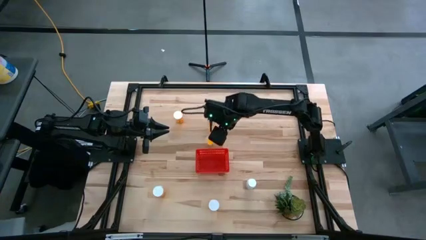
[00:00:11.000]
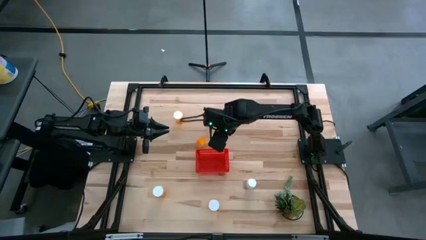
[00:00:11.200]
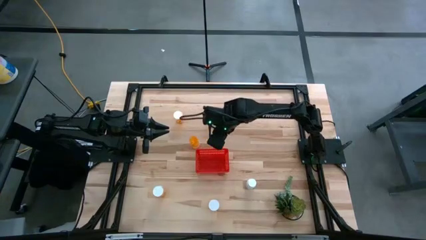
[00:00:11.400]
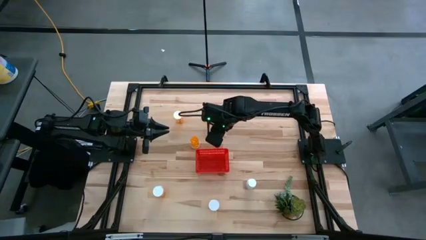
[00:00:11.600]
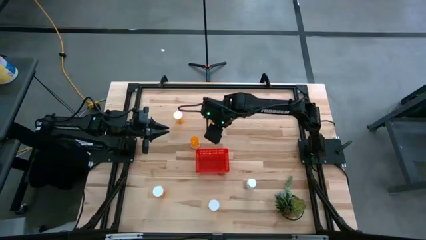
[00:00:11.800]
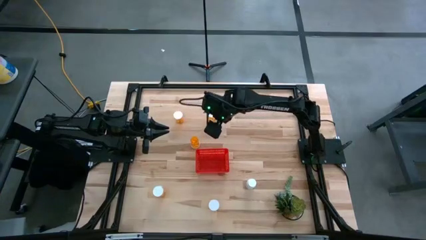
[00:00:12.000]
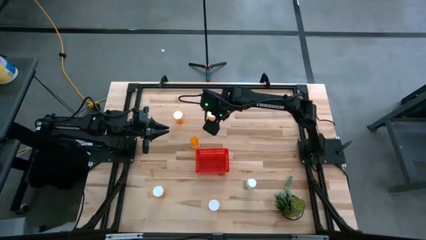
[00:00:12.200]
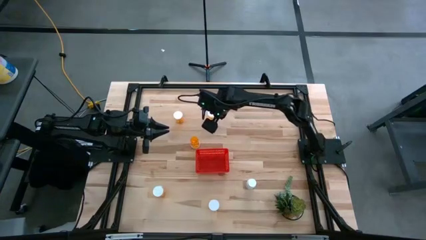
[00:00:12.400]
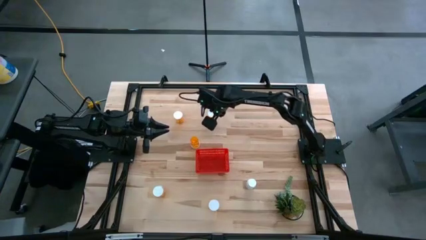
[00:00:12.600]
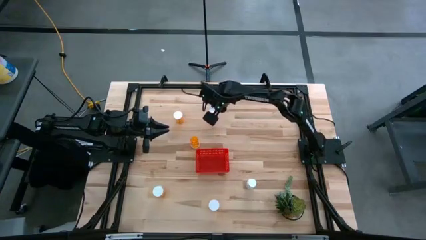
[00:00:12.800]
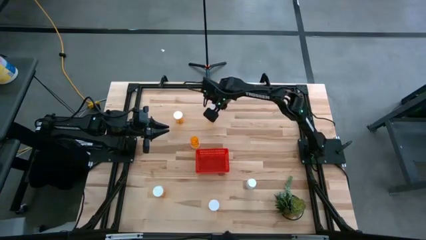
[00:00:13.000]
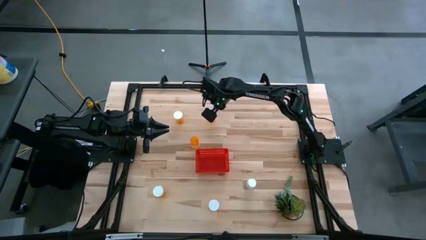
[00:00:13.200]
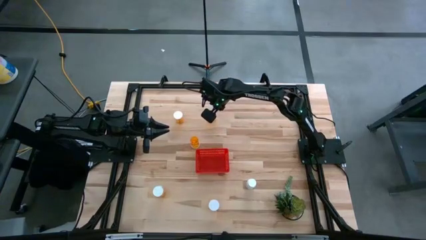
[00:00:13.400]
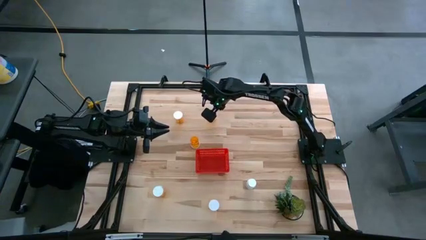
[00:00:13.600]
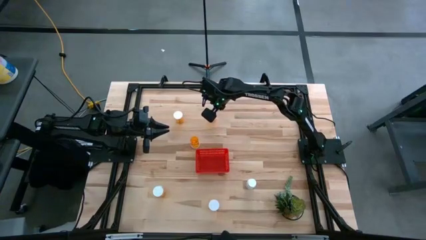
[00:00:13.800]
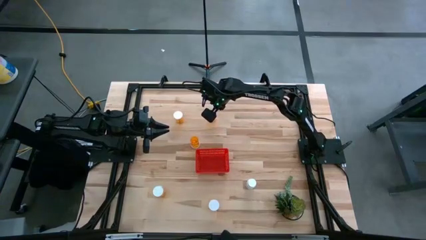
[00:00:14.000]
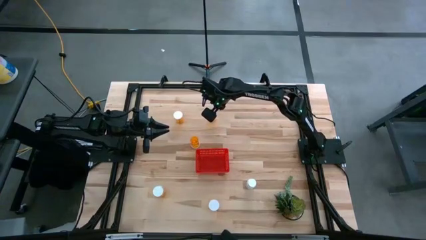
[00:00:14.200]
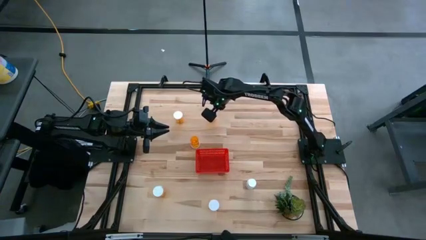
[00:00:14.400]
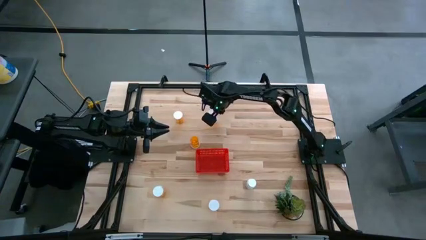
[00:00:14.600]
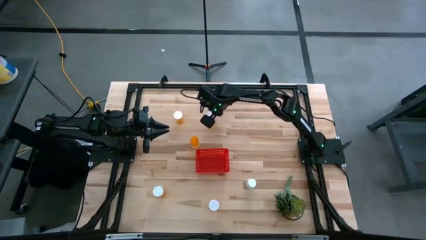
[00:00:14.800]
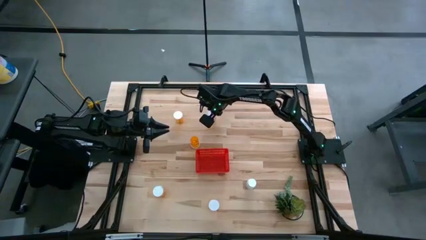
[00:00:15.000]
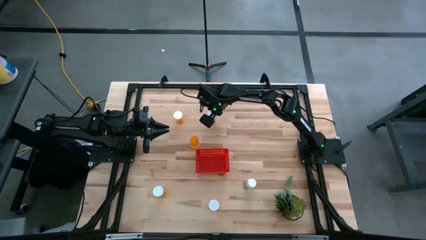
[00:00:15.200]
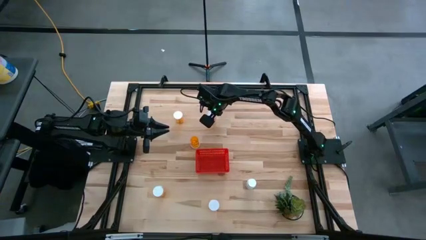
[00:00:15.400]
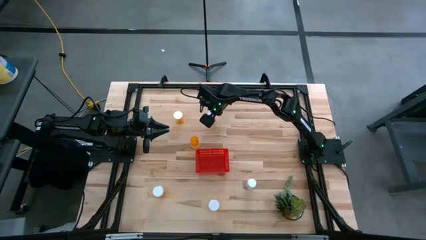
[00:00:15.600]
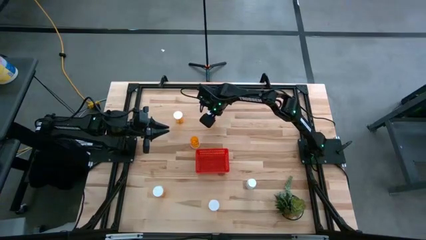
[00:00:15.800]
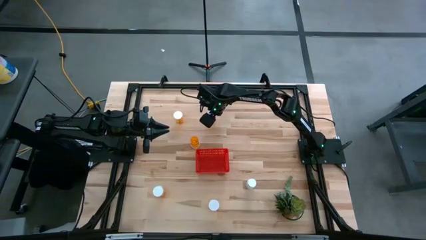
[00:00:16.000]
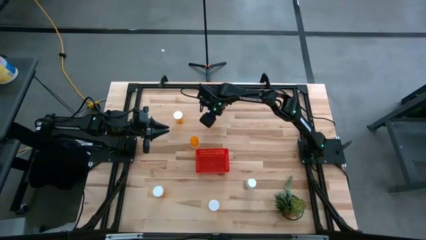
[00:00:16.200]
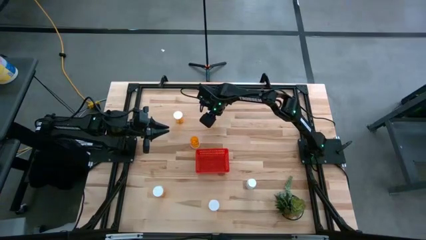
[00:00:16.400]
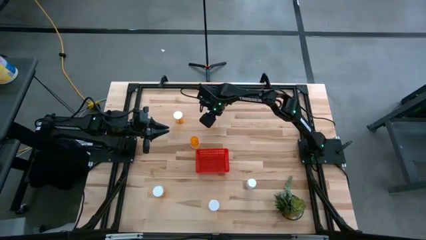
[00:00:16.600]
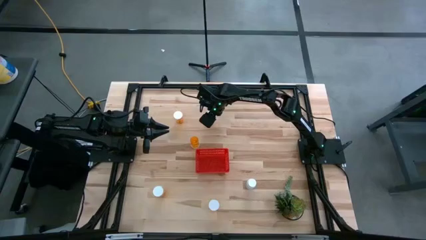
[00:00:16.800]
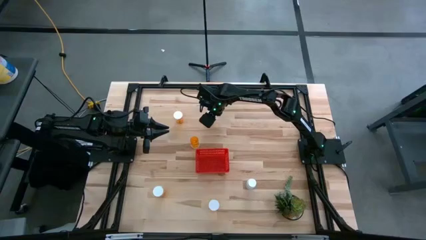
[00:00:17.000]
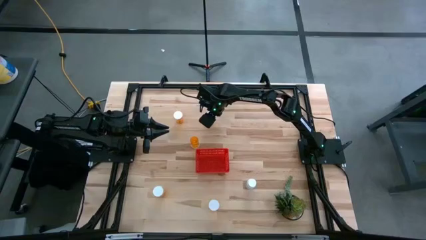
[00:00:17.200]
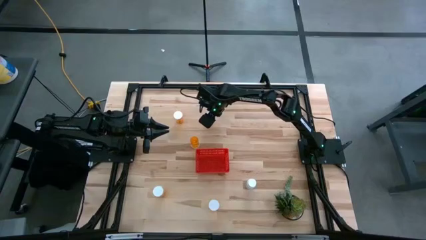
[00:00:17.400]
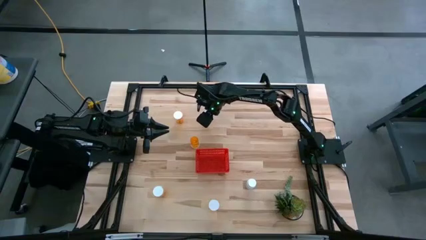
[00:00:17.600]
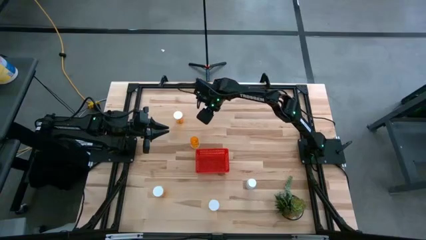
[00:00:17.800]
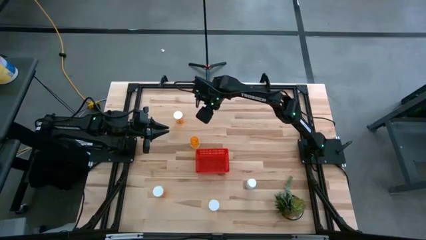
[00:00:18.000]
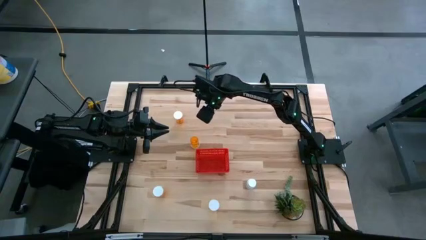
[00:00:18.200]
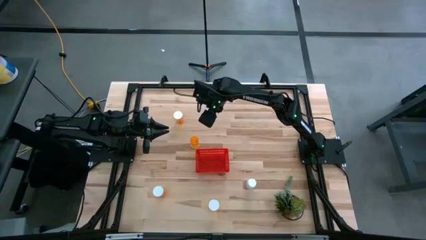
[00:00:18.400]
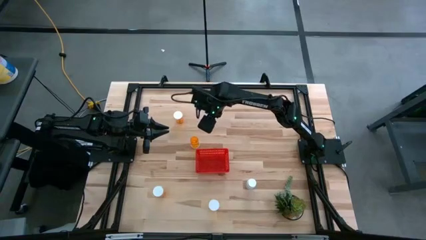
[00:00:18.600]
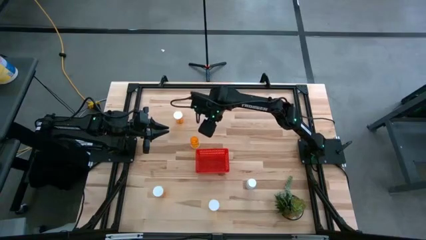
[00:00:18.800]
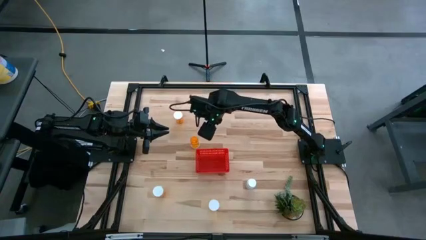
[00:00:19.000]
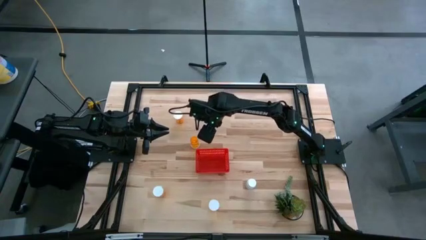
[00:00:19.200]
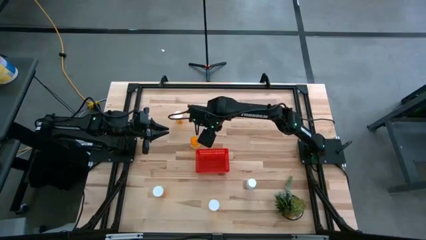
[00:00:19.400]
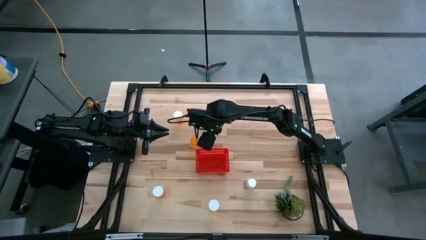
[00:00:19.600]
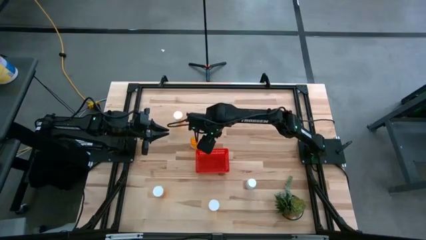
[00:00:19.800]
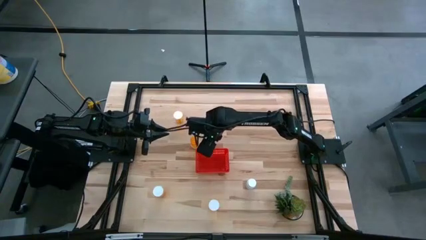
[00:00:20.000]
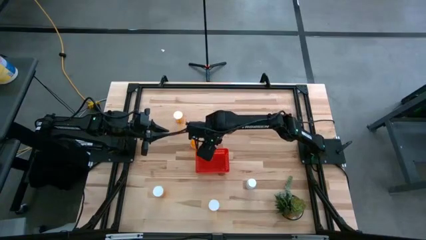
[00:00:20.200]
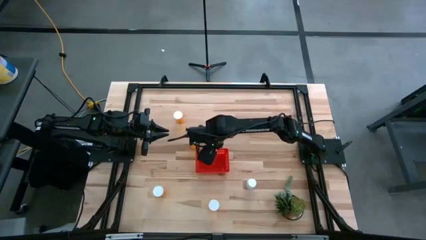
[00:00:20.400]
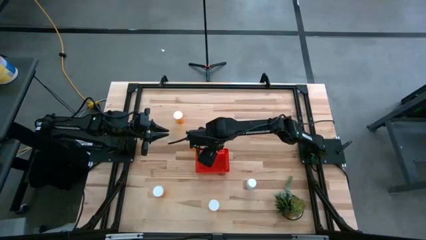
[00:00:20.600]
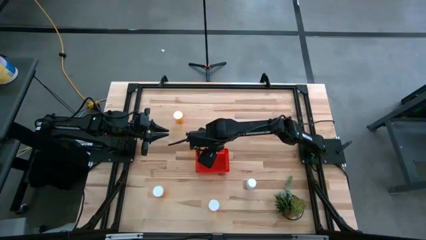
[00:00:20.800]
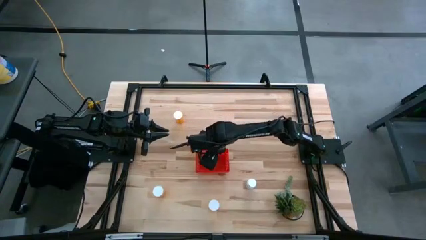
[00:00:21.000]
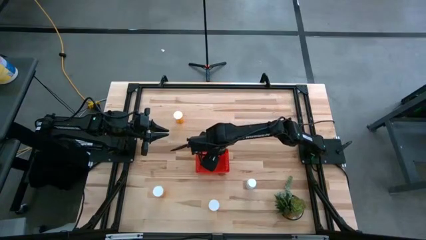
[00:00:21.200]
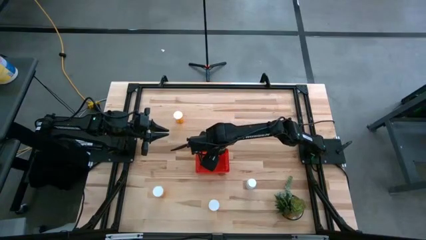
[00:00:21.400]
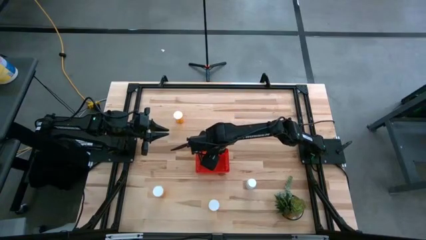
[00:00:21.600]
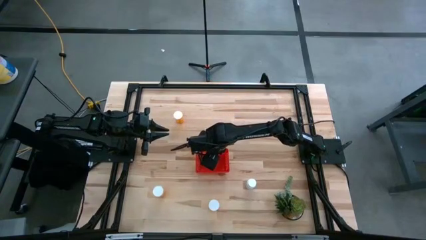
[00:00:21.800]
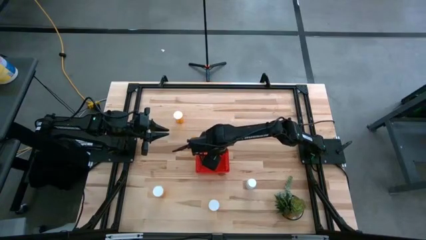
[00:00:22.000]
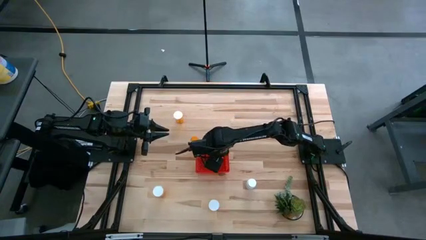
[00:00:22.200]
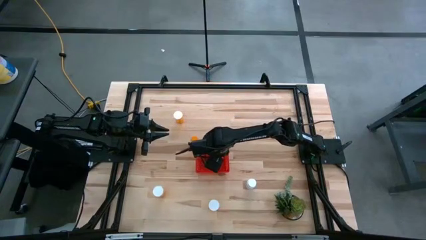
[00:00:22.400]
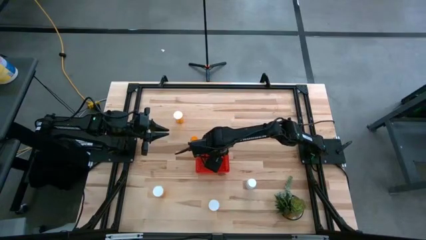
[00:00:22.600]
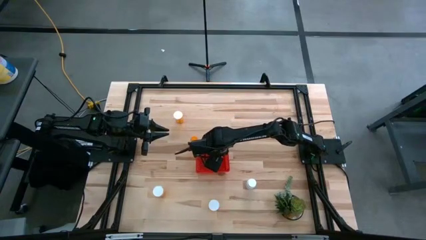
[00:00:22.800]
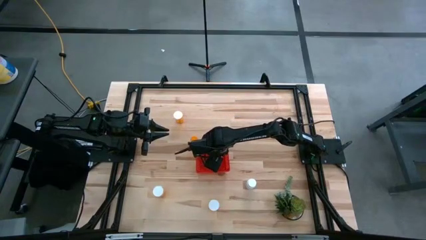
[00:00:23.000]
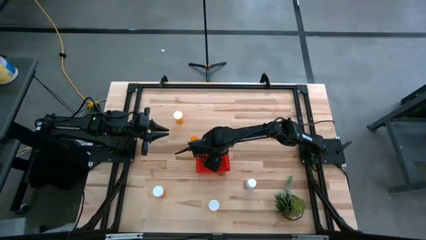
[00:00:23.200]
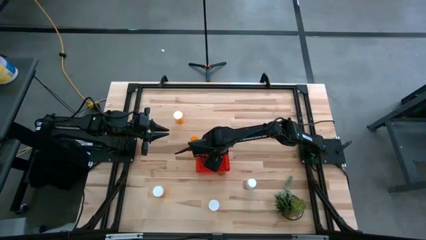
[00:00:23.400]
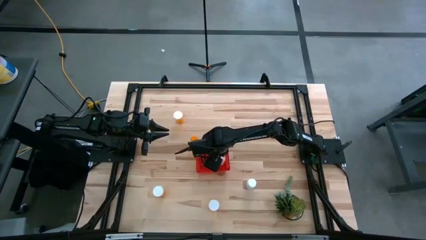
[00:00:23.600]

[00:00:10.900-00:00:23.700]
Task: Pick and place pill bottles into a basket
Put the orange pill bottle into the red basket

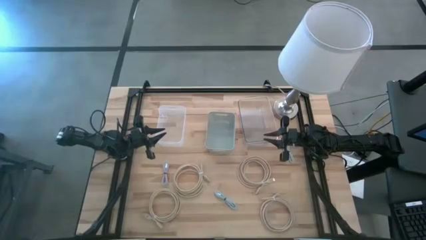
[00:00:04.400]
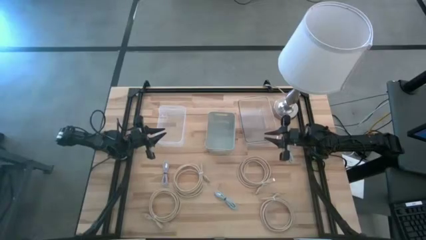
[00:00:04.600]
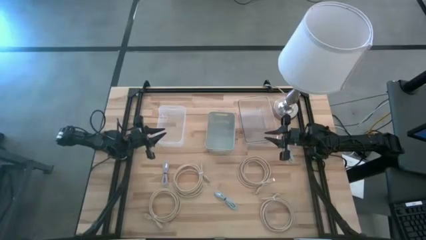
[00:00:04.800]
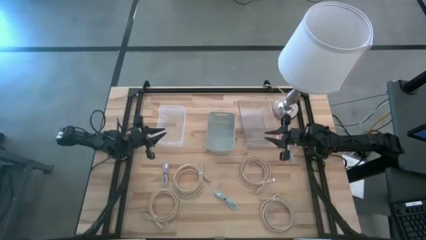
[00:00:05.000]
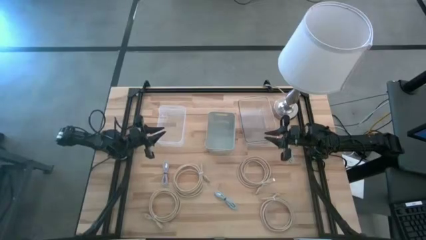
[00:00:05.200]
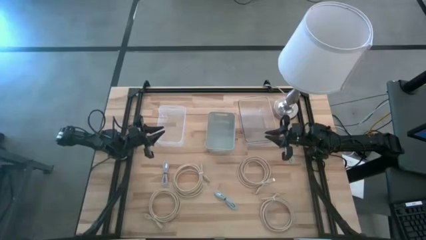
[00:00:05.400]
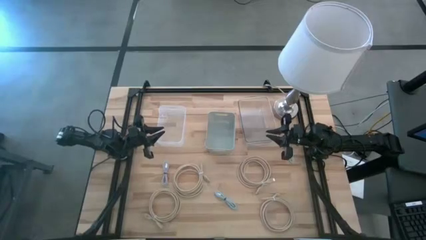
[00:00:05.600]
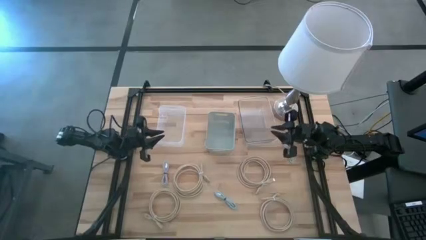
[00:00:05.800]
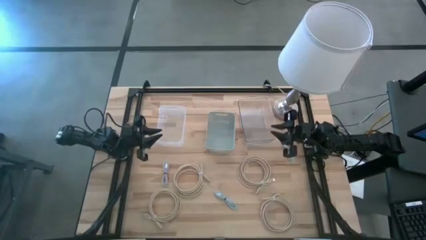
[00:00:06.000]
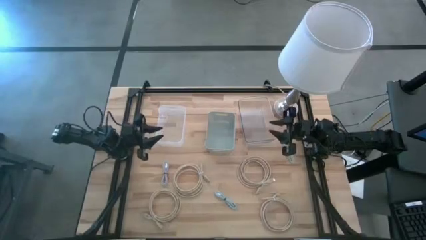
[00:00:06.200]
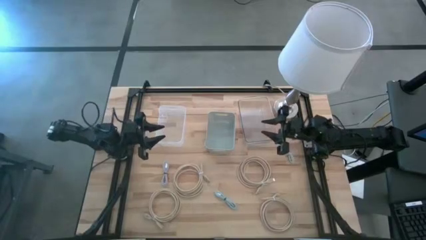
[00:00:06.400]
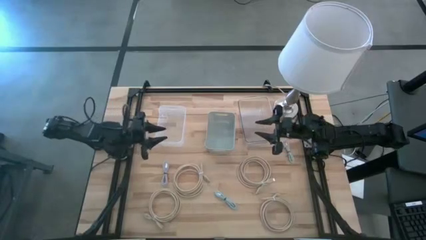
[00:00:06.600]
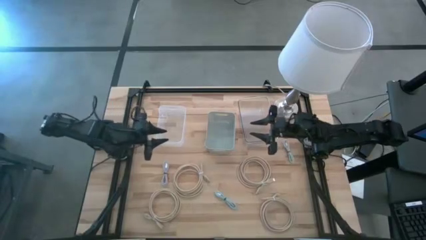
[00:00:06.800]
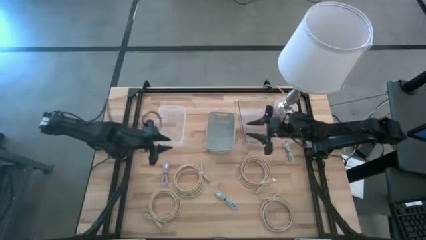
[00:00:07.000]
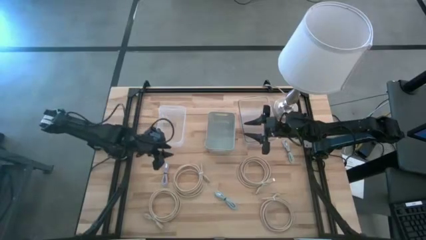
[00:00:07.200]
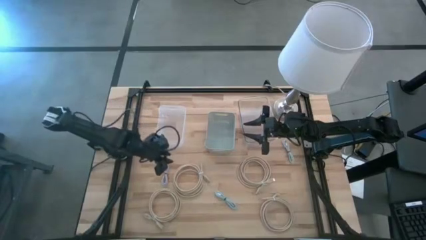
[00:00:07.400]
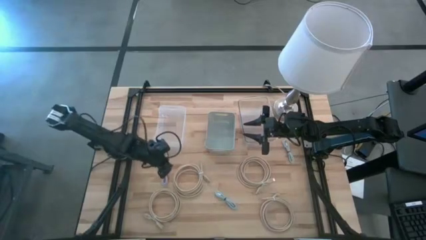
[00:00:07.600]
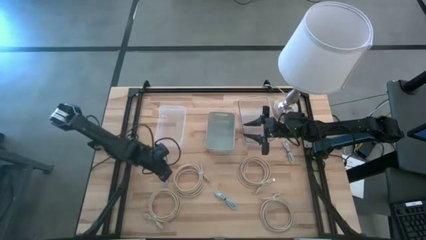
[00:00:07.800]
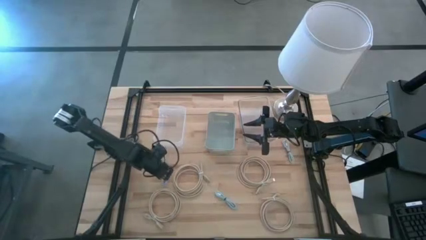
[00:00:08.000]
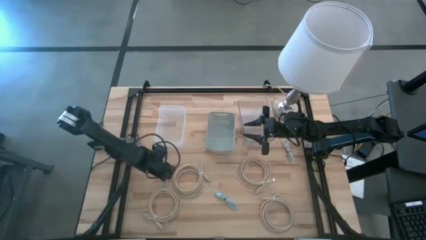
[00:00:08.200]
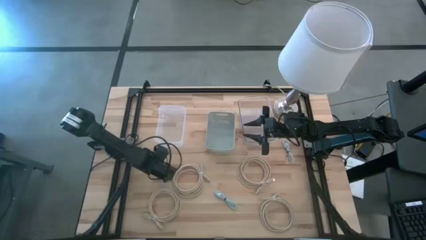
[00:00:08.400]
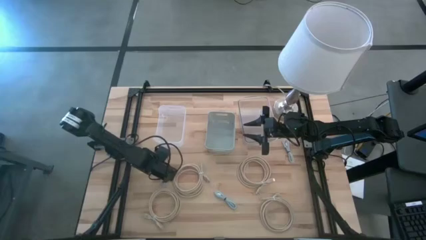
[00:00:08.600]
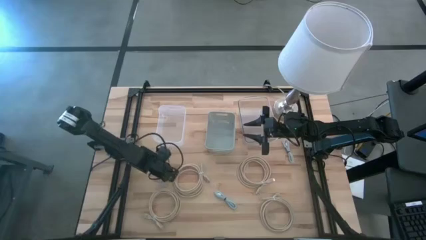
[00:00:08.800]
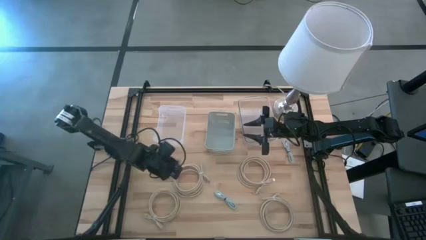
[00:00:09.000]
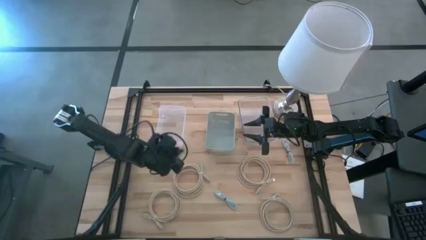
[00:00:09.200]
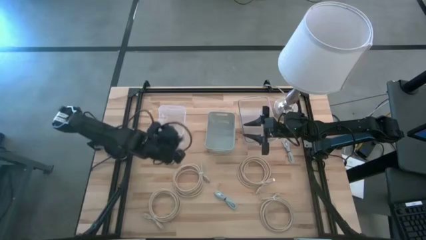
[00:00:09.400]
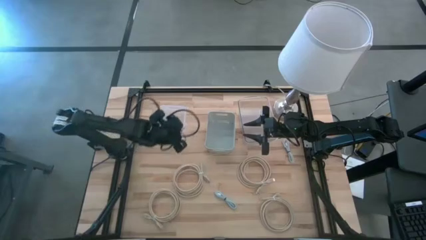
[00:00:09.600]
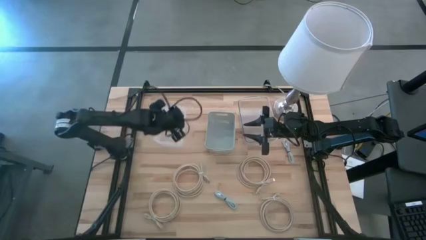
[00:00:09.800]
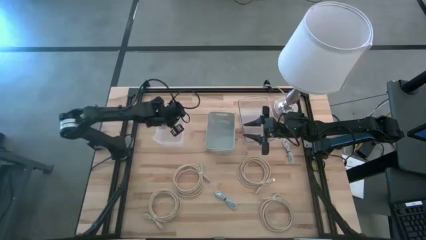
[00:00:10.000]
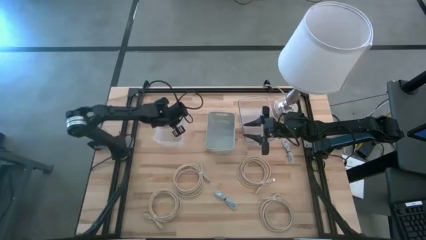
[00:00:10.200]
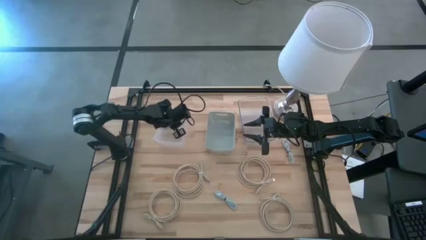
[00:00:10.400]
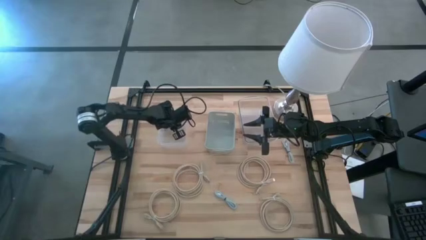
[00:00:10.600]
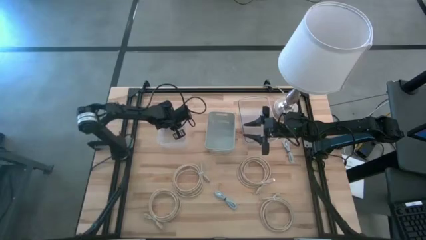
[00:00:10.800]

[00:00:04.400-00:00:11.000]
Task: Pick & Place USB Port
Put the purple charger cable into the left transparent bin
